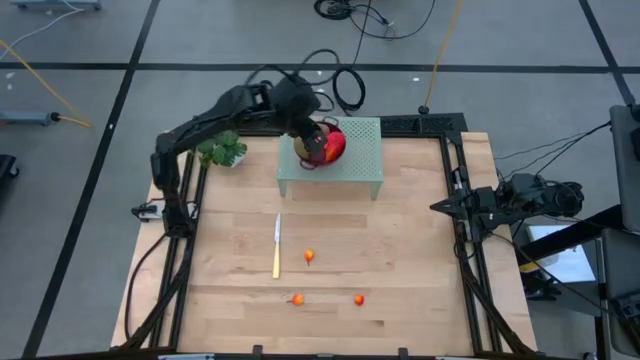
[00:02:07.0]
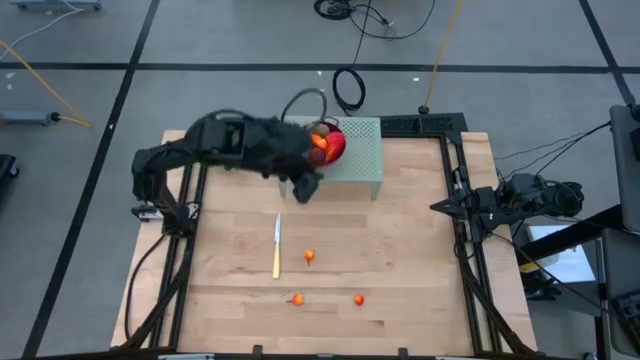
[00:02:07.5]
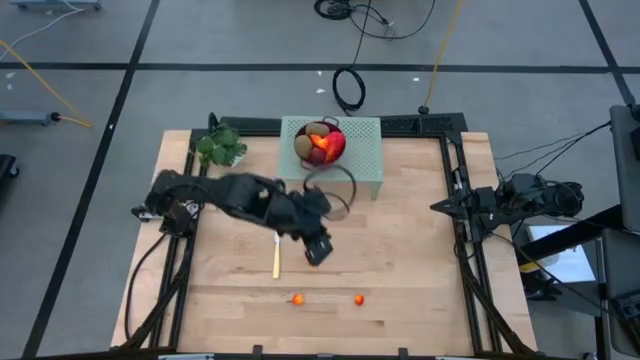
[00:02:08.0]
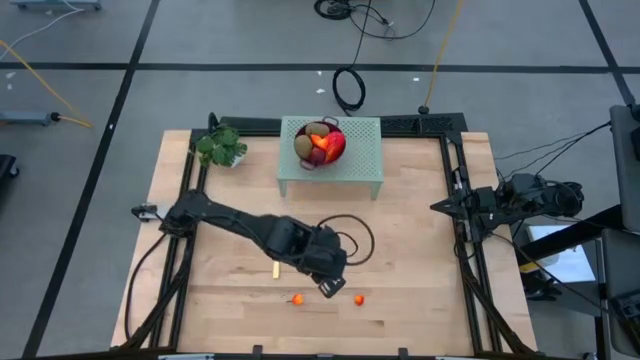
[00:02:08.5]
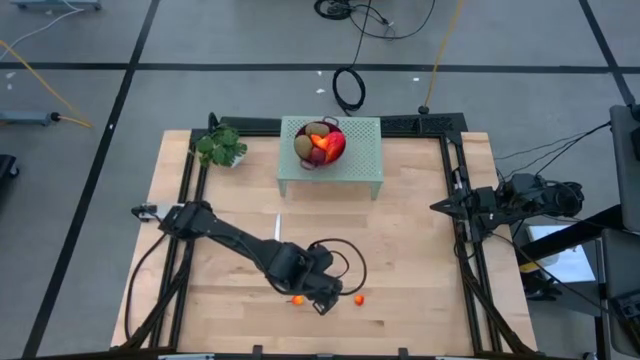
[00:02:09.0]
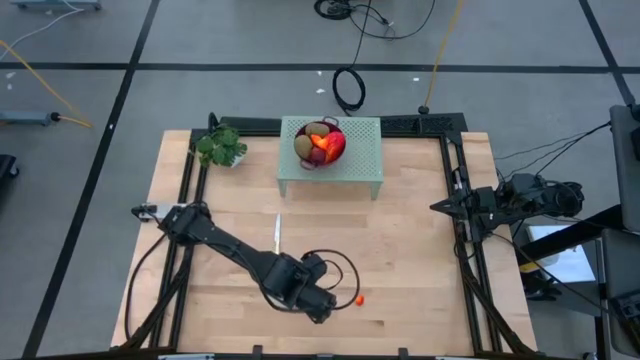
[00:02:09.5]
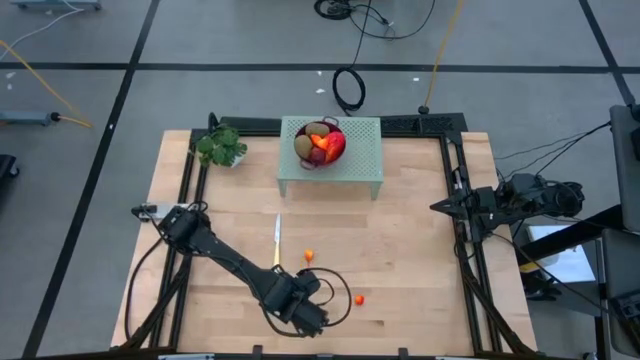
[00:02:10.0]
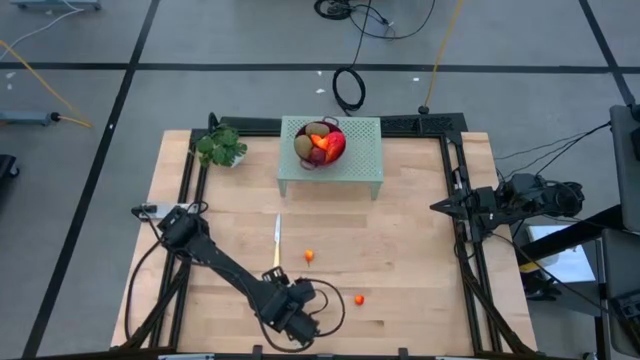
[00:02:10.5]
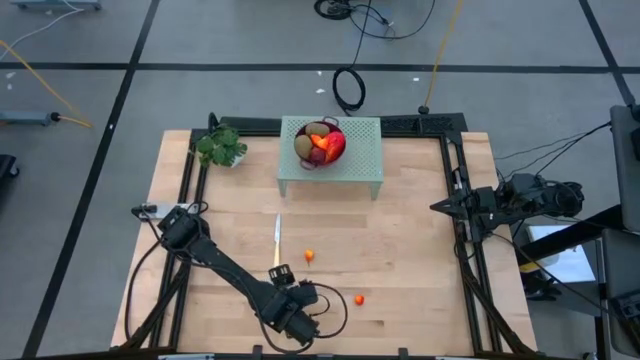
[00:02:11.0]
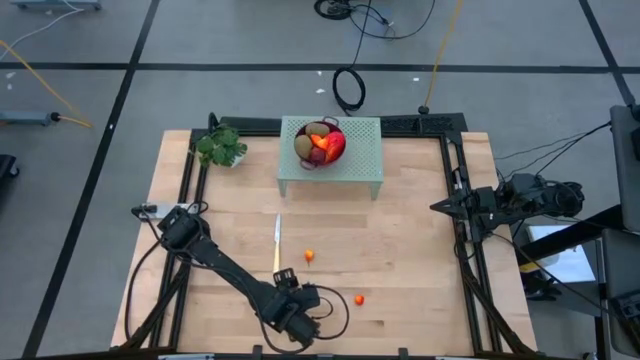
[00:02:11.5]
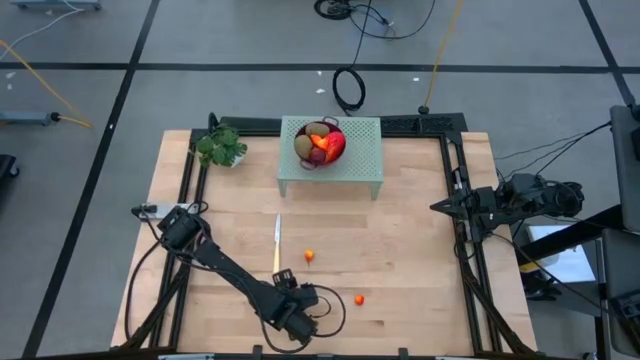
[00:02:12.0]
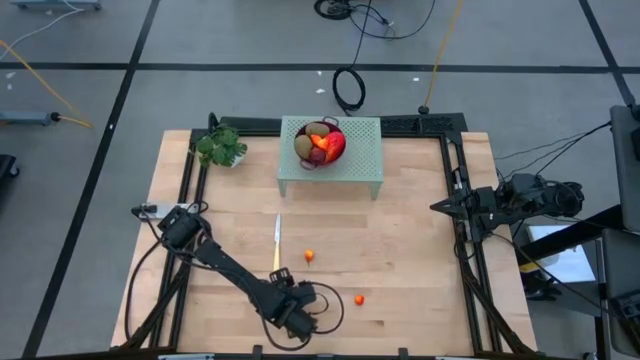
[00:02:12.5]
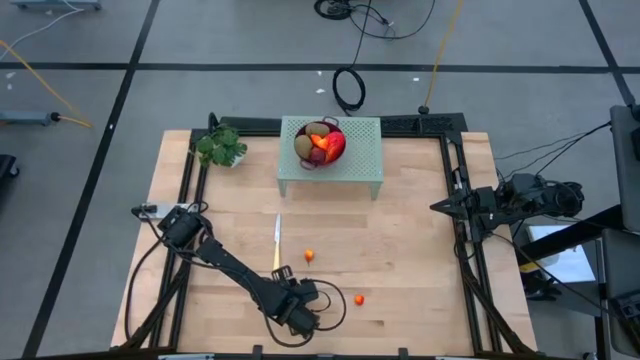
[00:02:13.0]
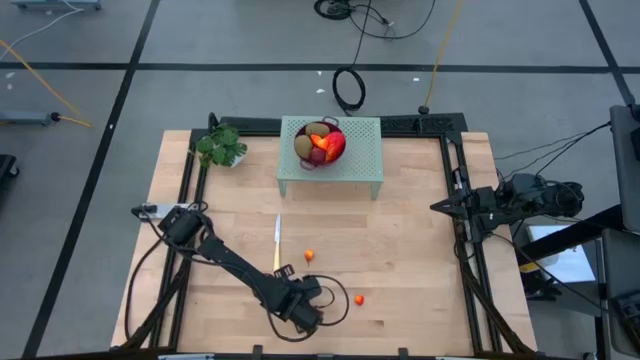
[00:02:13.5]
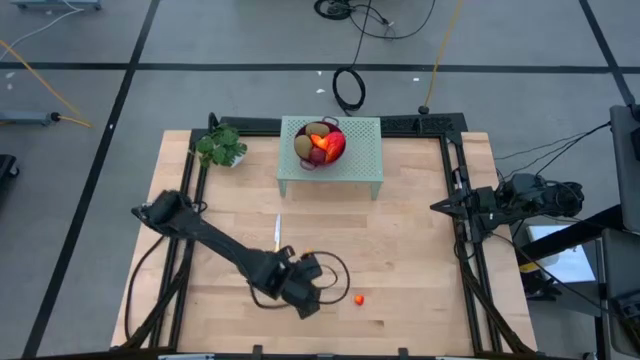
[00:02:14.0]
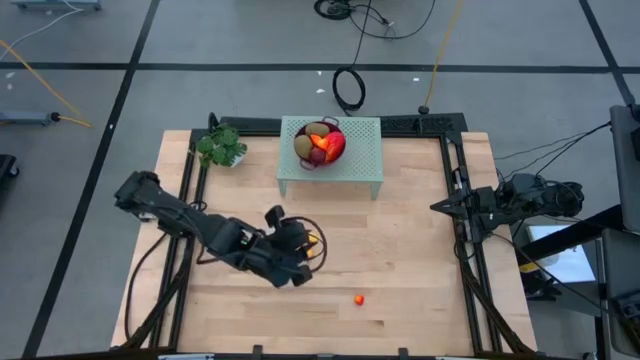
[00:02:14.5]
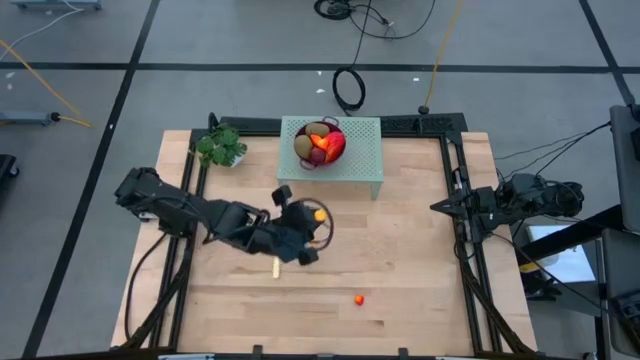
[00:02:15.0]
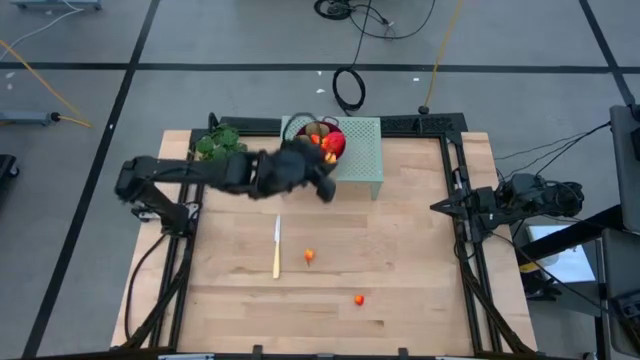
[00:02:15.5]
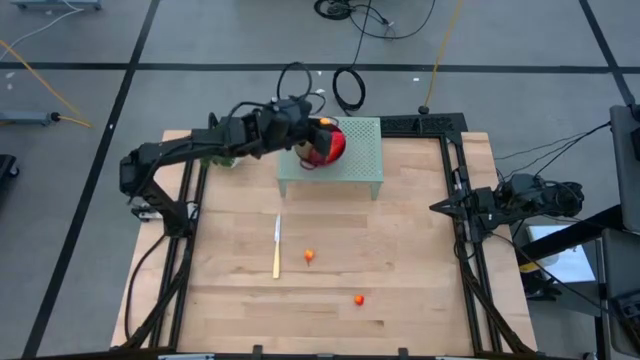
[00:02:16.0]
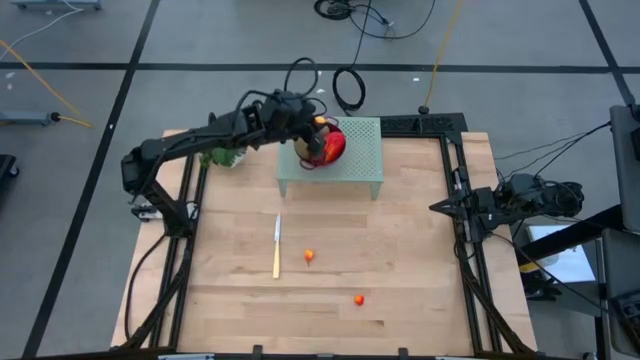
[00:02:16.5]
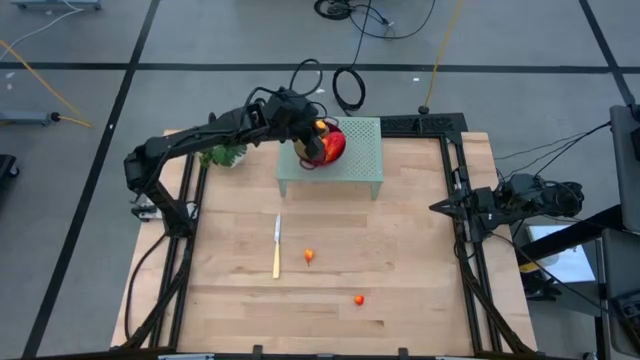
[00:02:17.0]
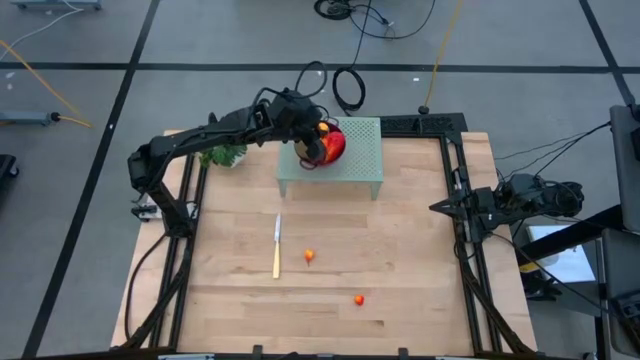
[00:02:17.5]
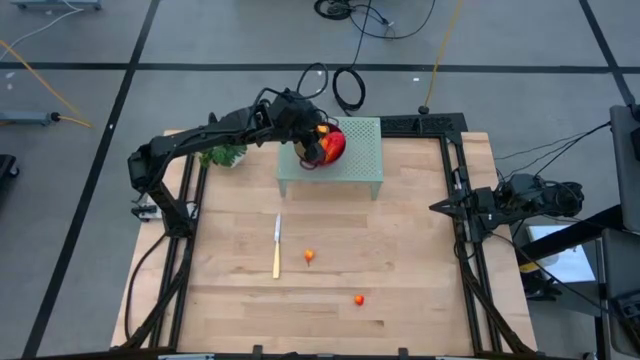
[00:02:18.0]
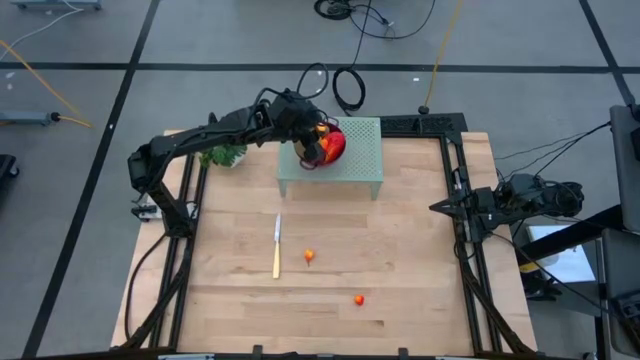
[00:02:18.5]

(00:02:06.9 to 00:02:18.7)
Task: Pick & Place Fruit
Put the pear into the strainer bowl on the shelf

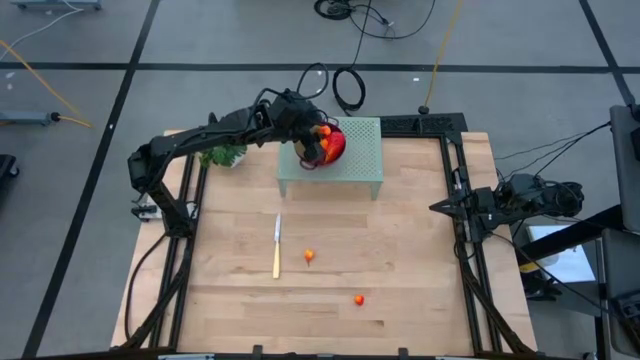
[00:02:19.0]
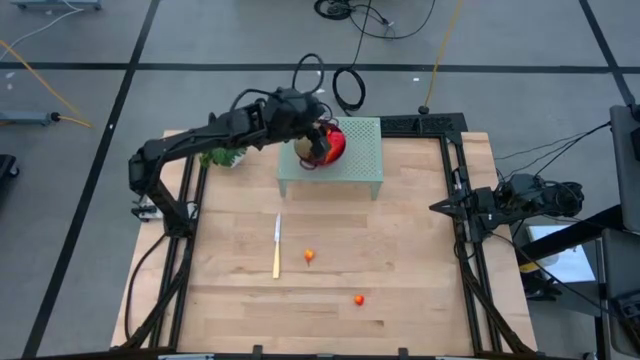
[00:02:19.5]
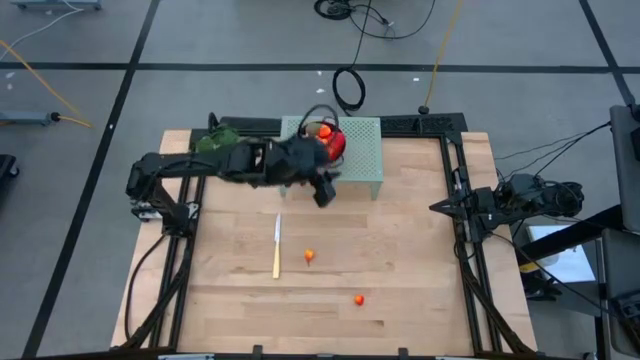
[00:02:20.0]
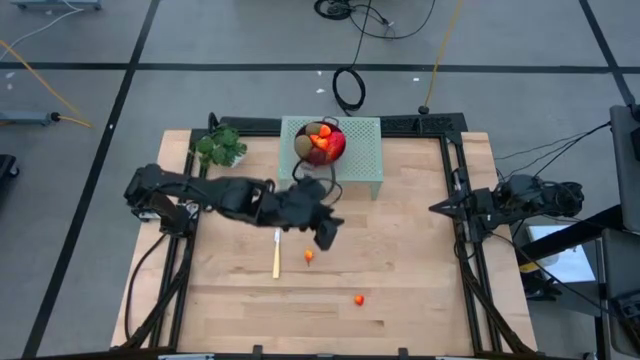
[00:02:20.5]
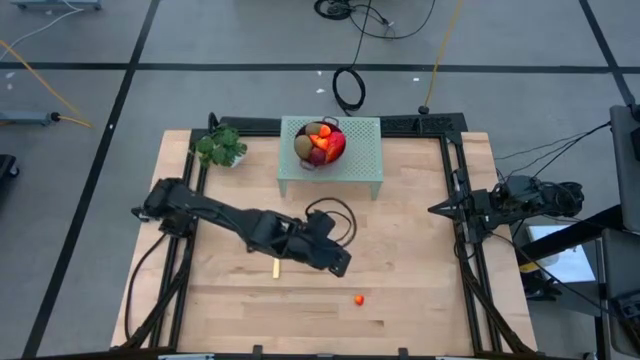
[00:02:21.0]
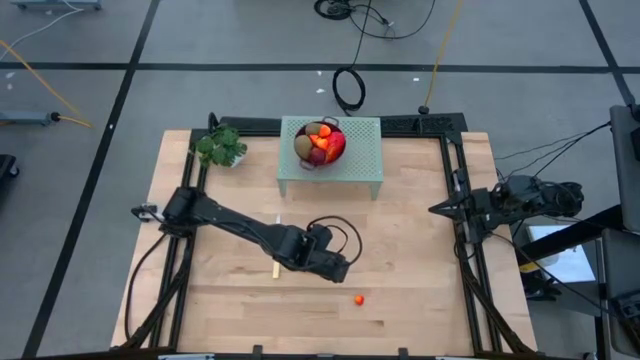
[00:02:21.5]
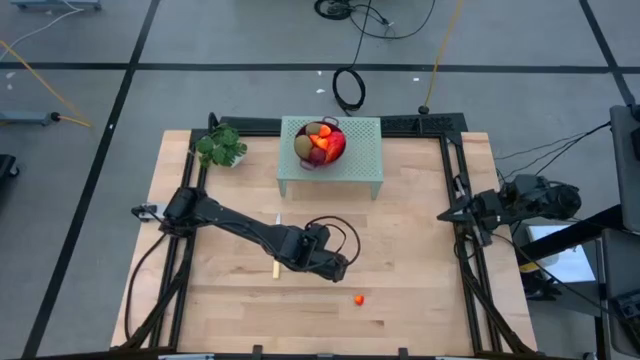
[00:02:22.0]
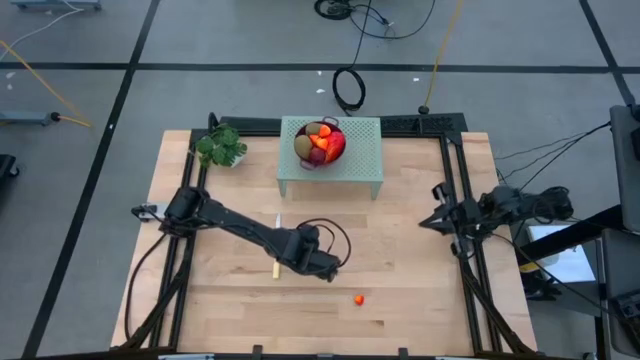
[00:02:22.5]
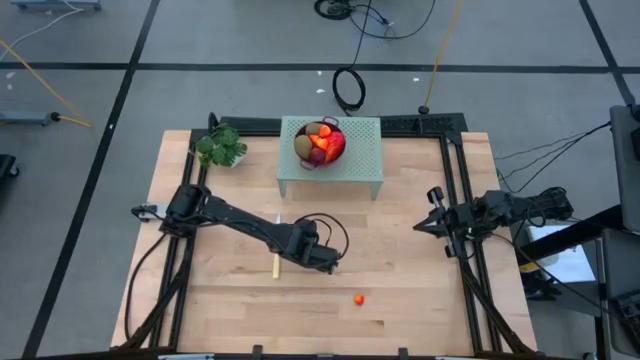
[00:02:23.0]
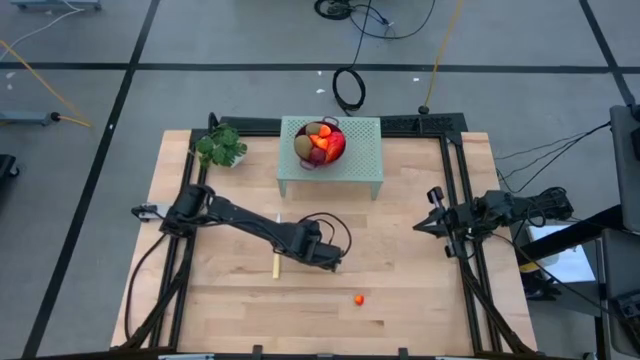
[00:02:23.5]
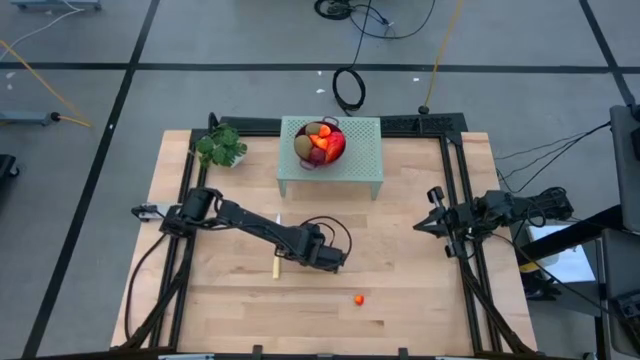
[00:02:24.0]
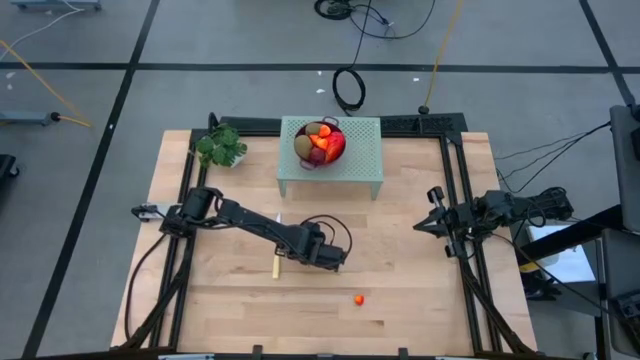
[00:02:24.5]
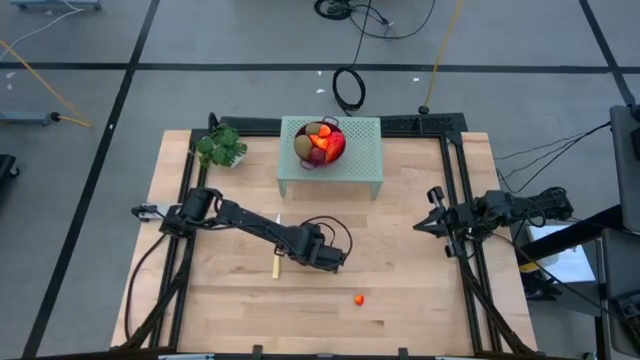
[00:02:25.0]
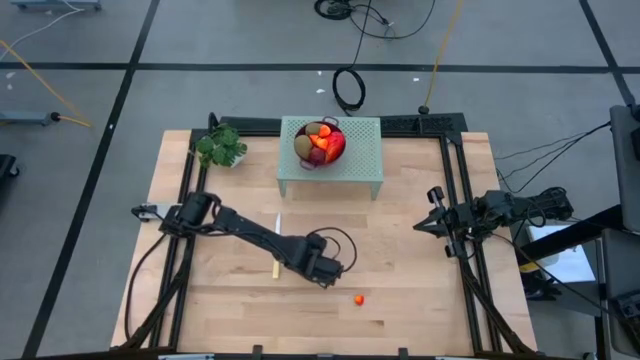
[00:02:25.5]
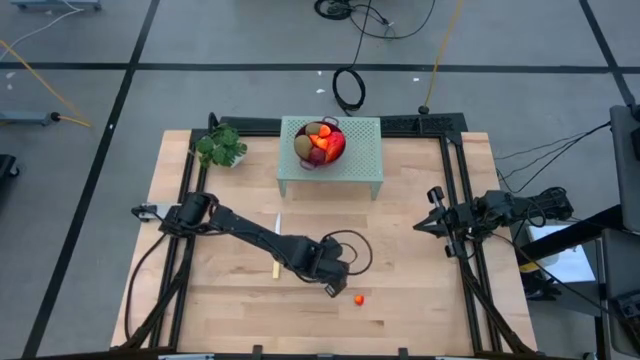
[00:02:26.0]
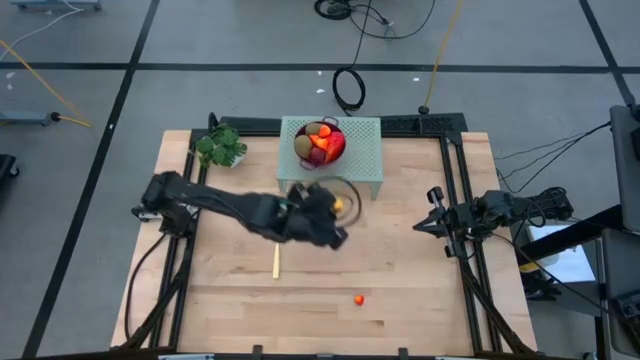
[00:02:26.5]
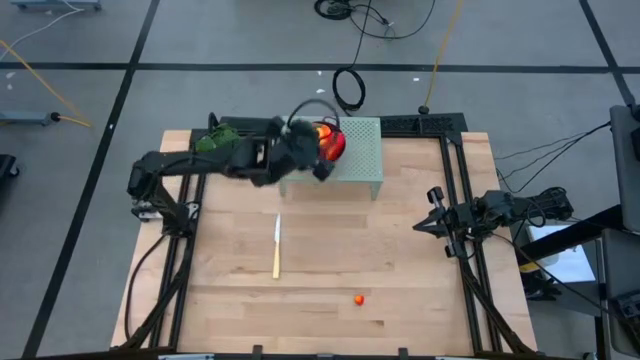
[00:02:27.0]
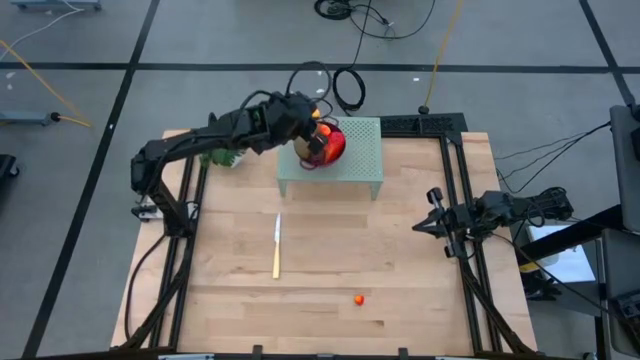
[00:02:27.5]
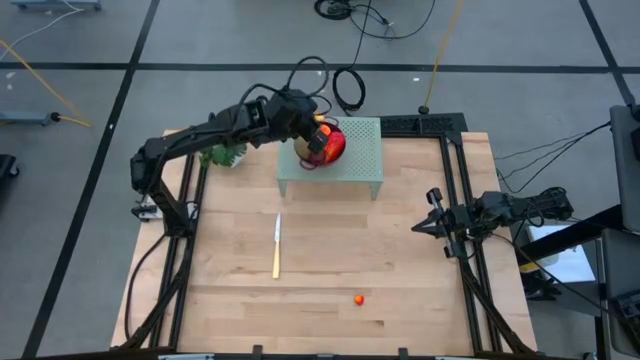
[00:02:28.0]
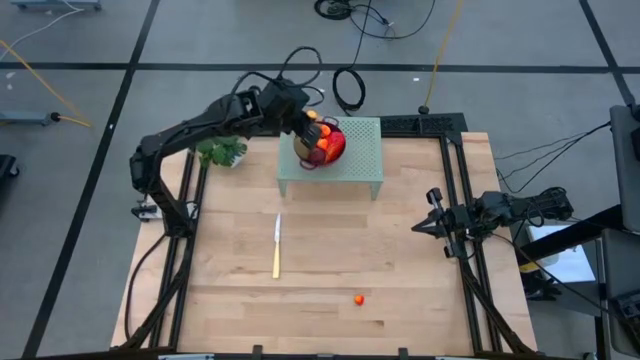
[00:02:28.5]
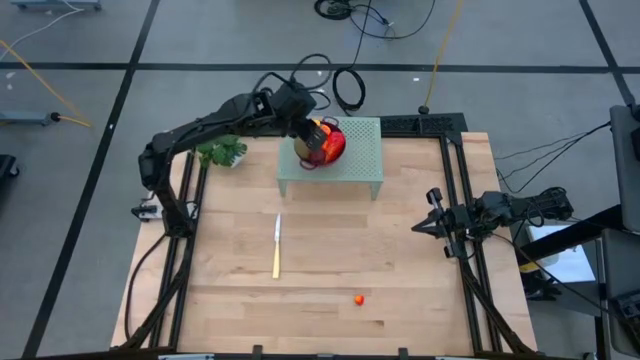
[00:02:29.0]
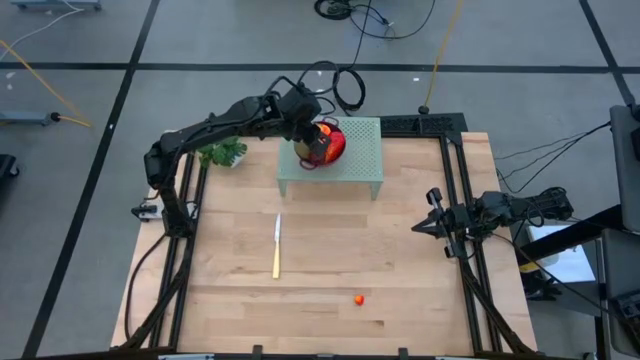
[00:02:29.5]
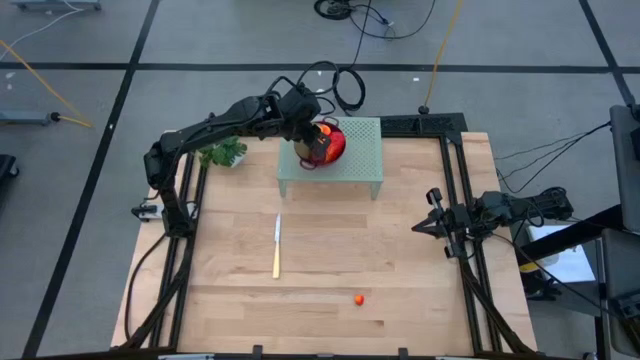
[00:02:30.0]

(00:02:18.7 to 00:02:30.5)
Put the pear into the strainer bowl on the shelf
